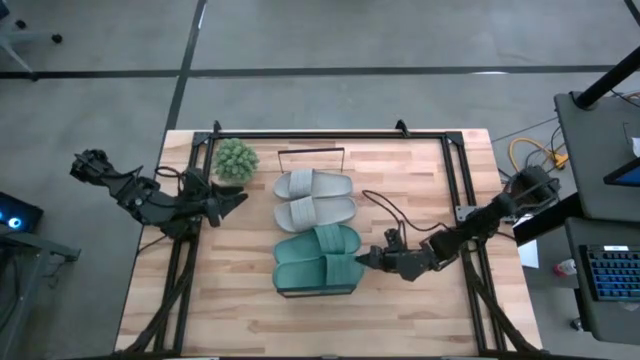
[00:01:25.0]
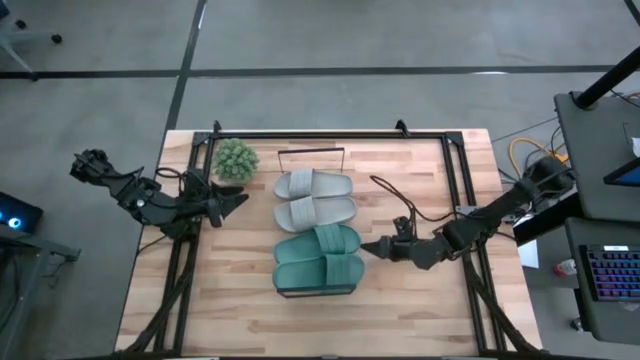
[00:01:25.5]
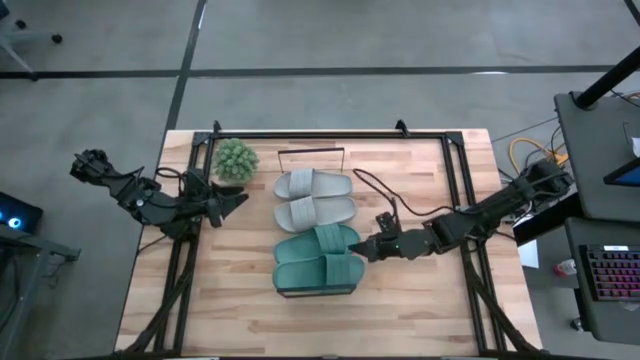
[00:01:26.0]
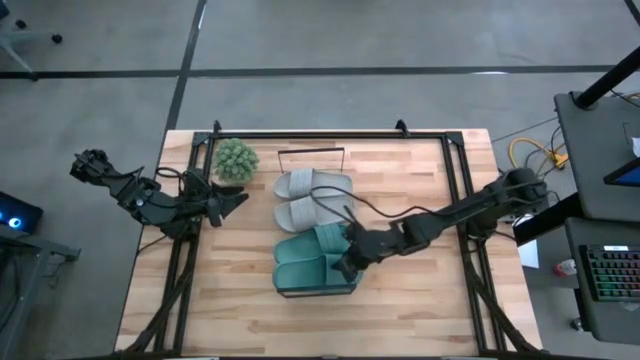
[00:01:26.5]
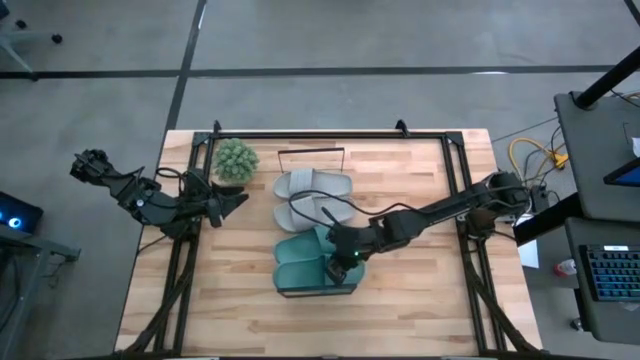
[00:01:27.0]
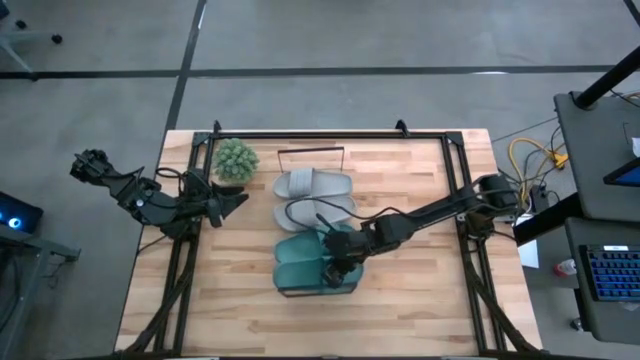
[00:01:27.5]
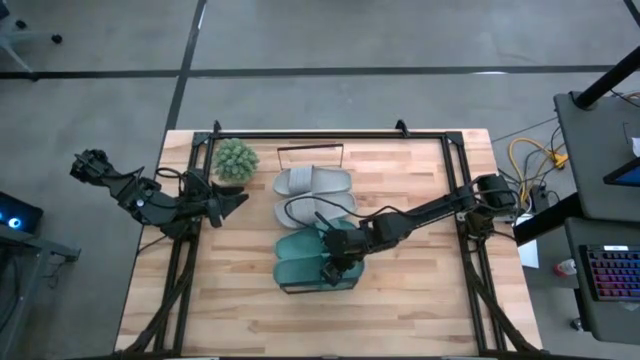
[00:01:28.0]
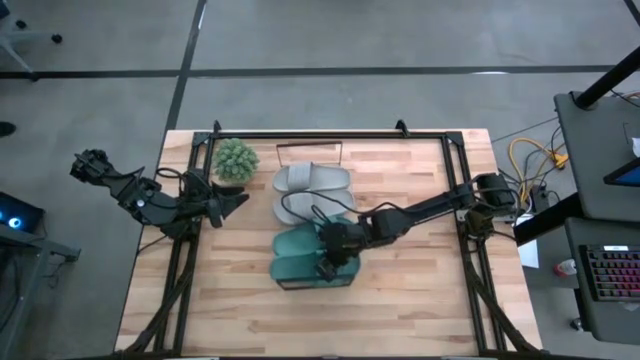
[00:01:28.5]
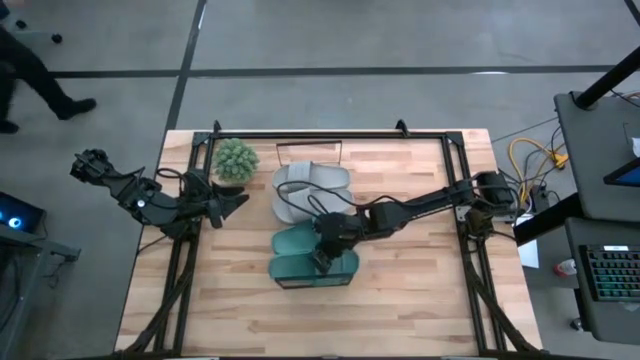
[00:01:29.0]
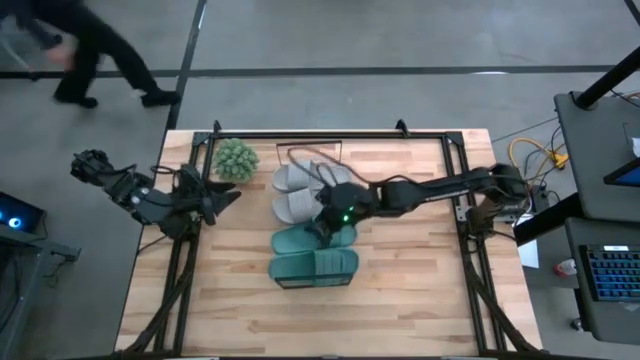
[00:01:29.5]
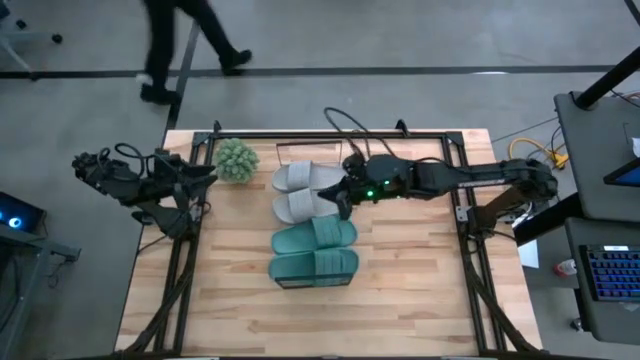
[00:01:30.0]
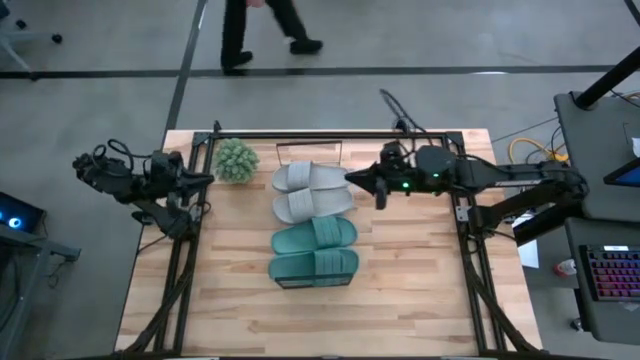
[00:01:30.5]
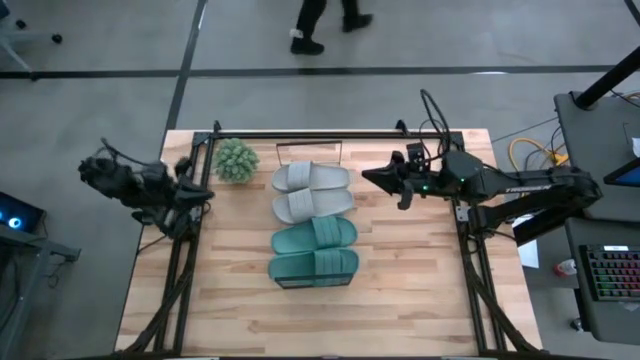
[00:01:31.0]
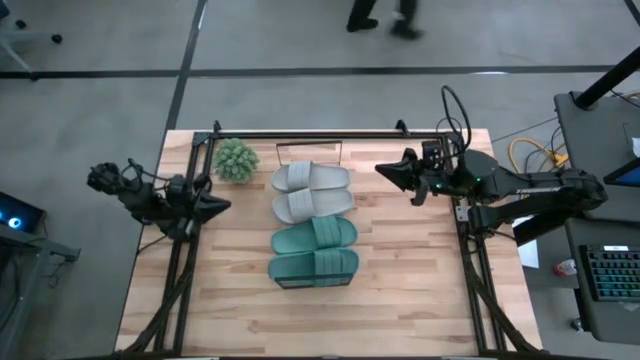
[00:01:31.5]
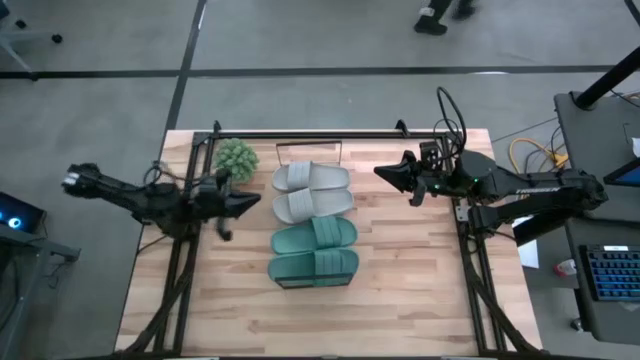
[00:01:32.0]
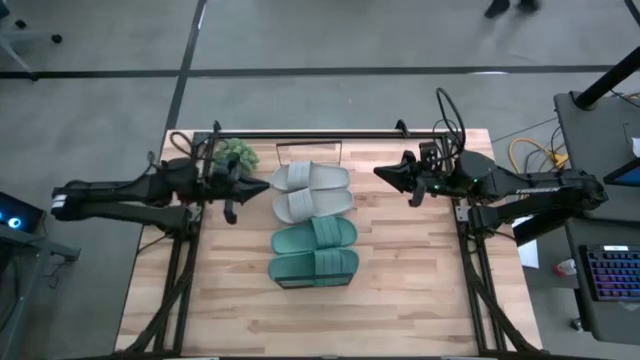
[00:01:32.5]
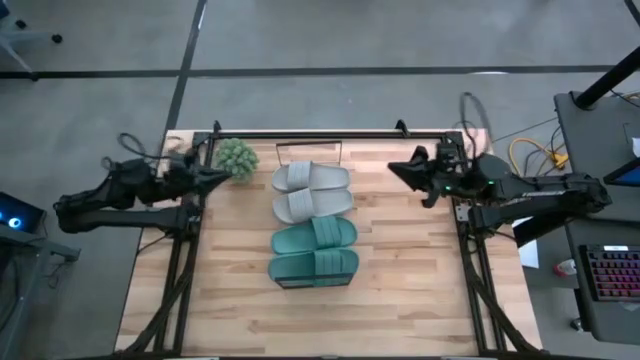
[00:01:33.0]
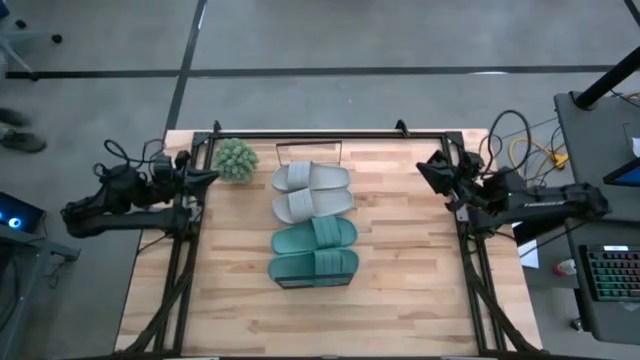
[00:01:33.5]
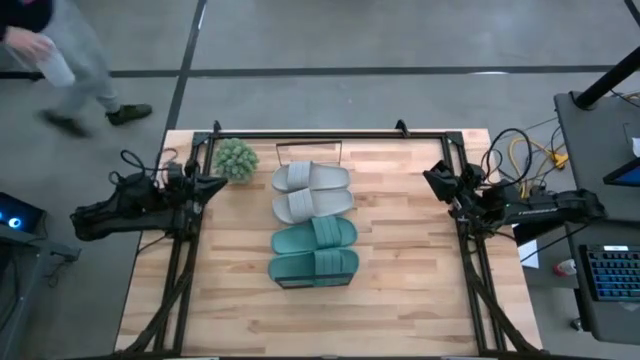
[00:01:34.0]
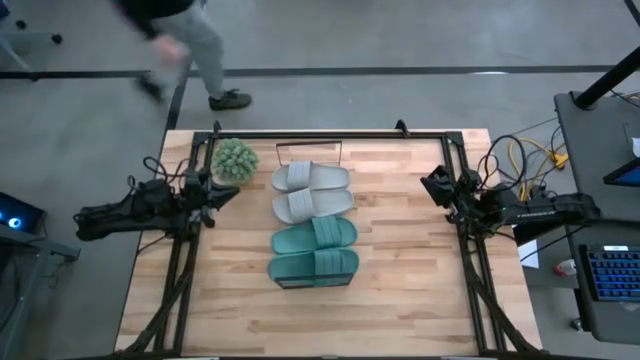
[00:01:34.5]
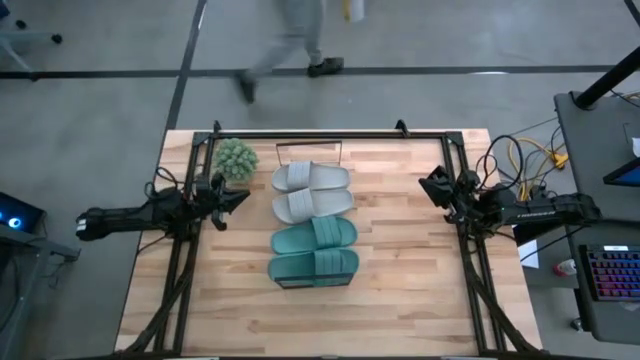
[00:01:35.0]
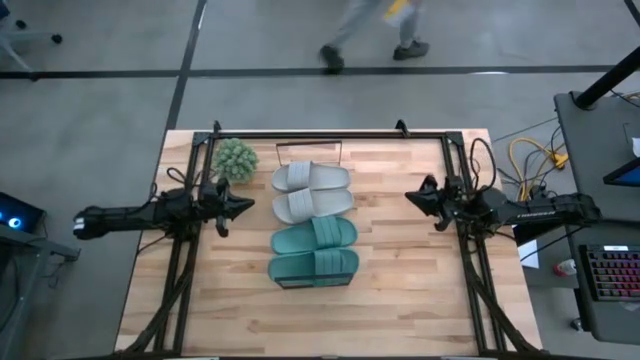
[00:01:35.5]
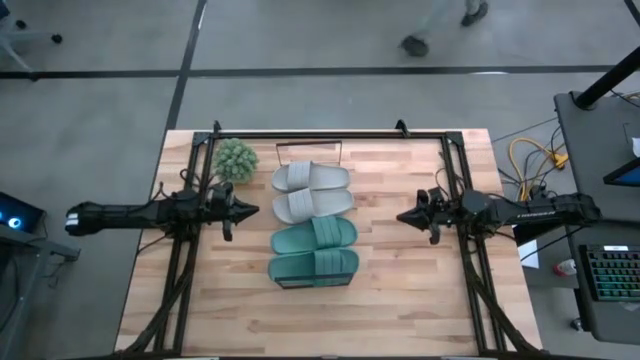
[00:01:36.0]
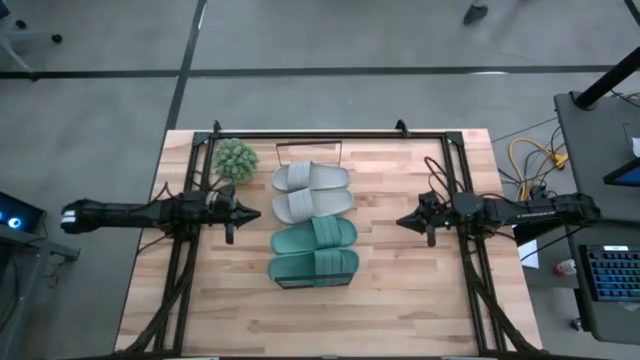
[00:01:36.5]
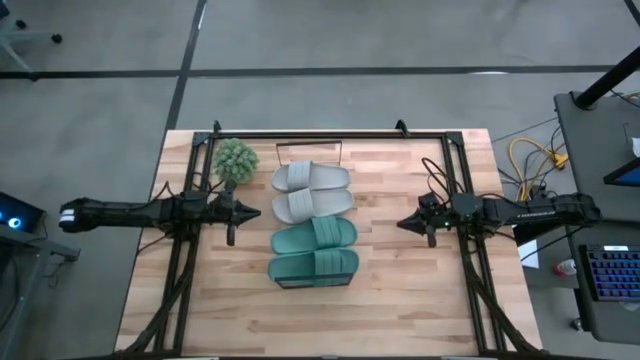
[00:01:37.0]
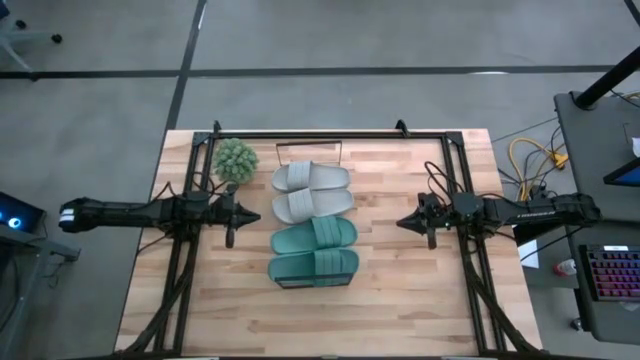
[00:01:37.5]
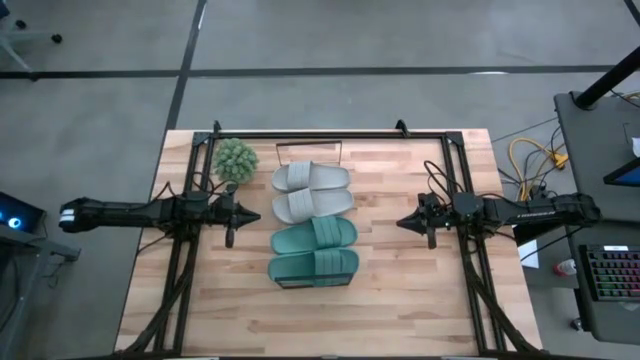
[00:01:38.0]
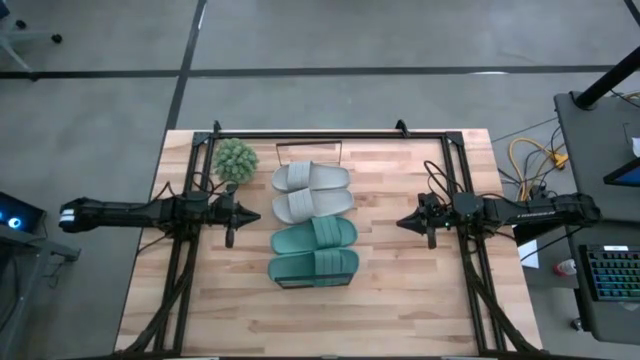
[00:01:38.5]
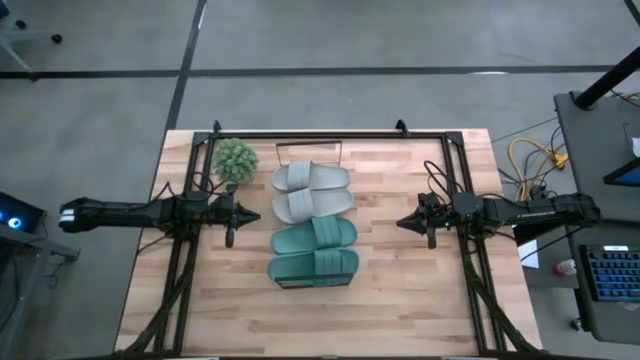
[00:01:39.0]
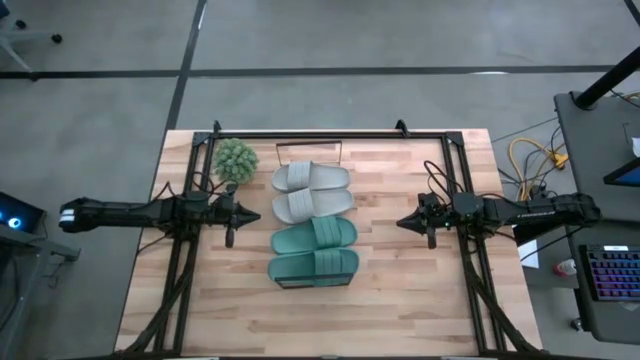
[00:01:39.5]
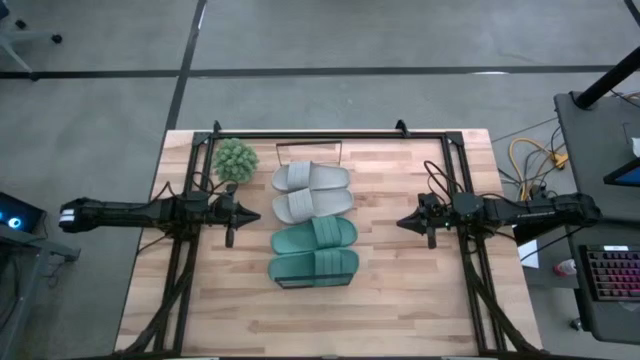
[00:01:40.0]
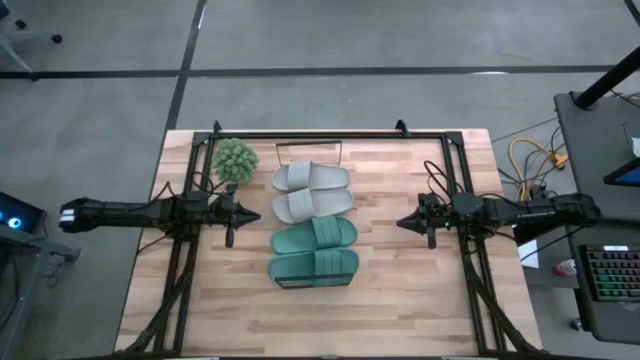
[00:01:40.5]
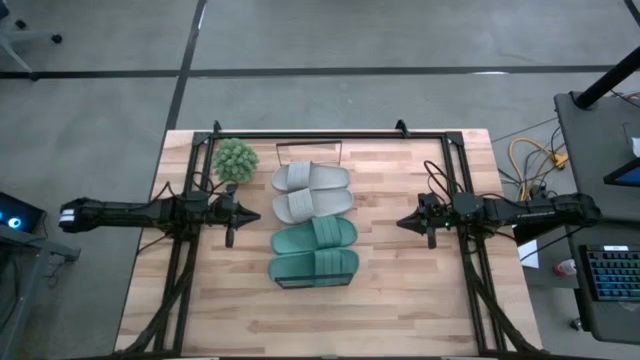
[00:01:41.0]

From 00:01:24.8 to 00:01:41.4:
Task: Pick and place slides into the shelf
Return to Home Position
